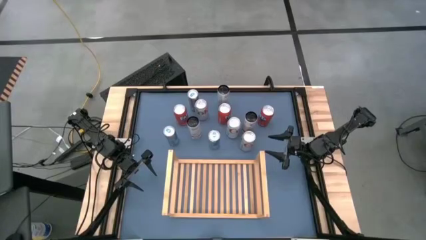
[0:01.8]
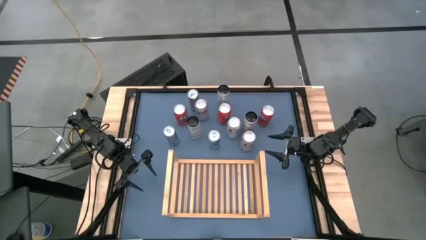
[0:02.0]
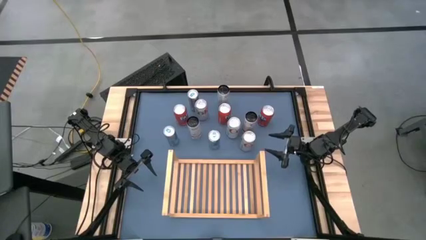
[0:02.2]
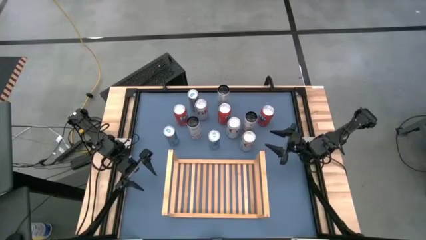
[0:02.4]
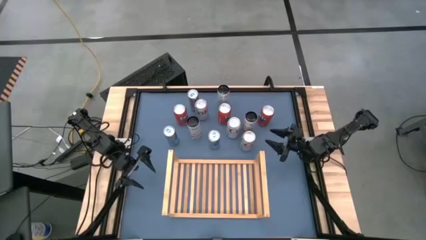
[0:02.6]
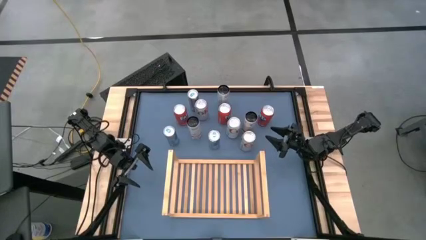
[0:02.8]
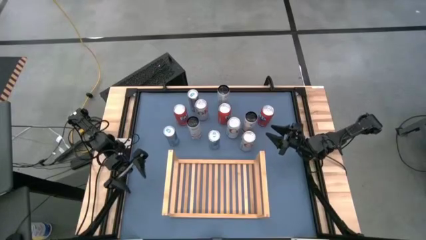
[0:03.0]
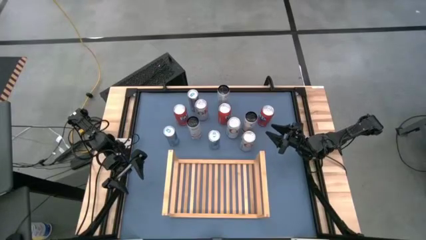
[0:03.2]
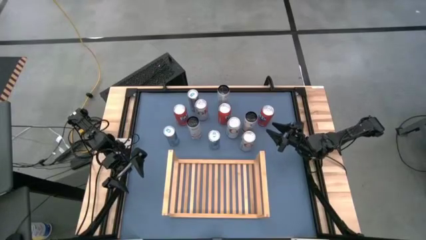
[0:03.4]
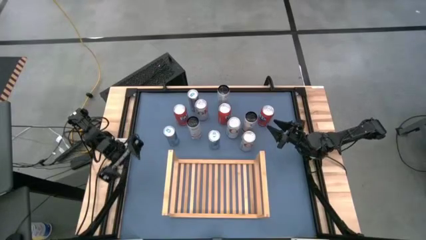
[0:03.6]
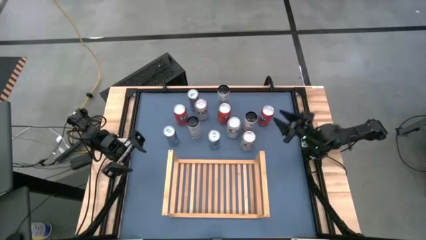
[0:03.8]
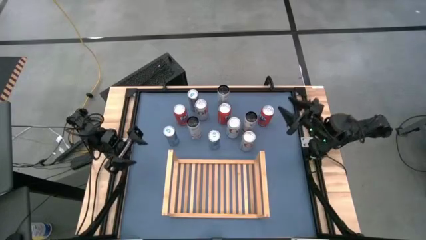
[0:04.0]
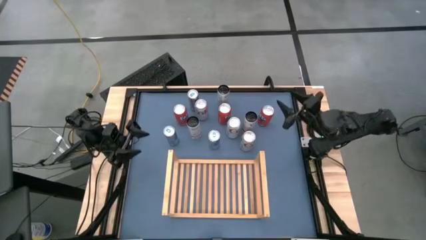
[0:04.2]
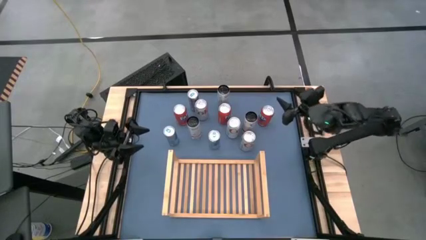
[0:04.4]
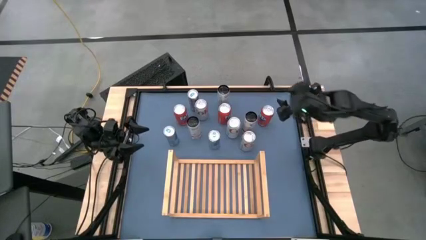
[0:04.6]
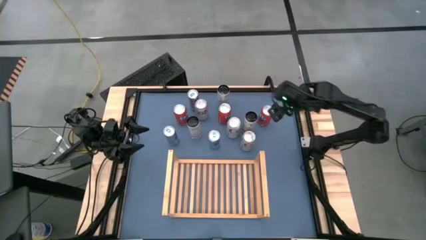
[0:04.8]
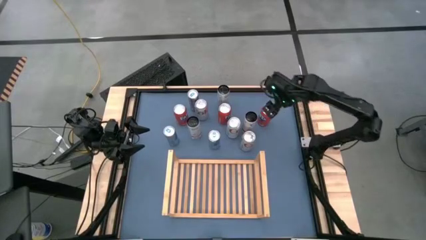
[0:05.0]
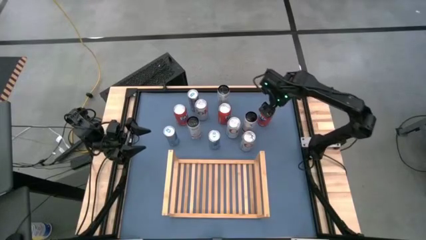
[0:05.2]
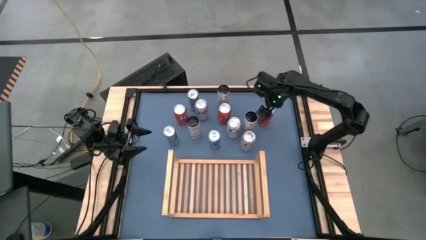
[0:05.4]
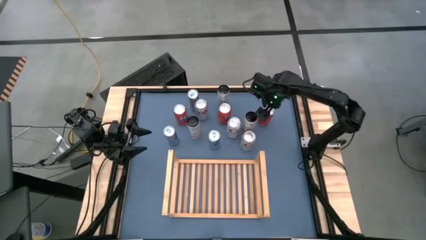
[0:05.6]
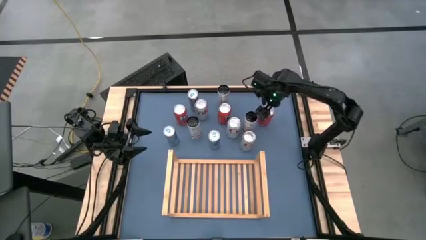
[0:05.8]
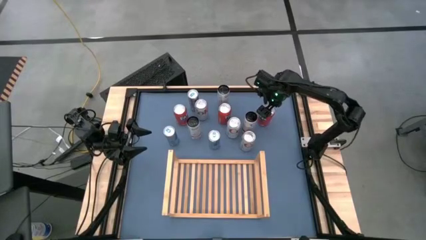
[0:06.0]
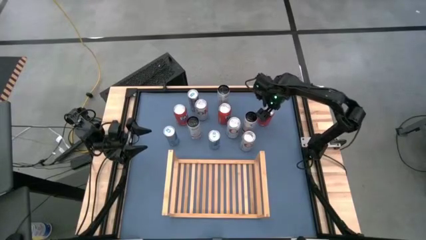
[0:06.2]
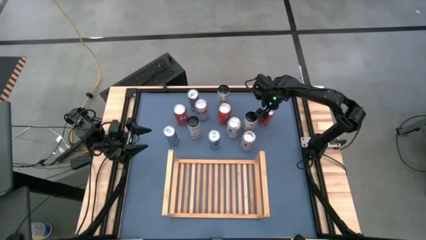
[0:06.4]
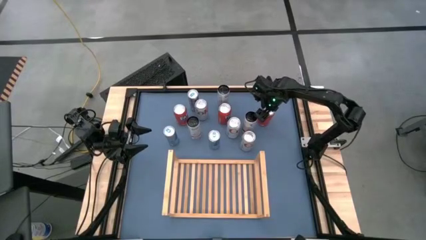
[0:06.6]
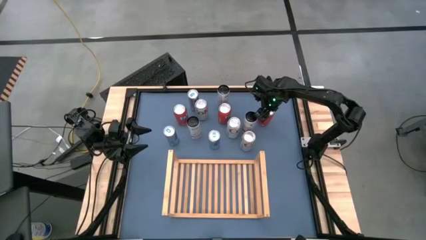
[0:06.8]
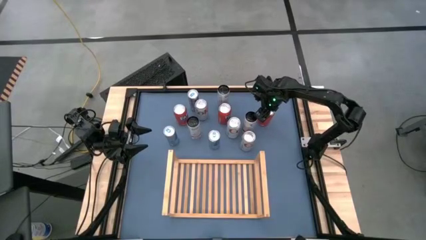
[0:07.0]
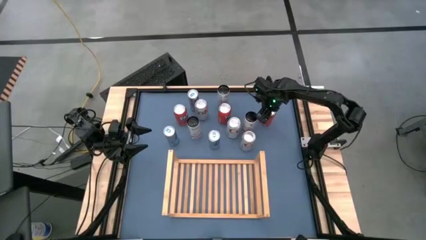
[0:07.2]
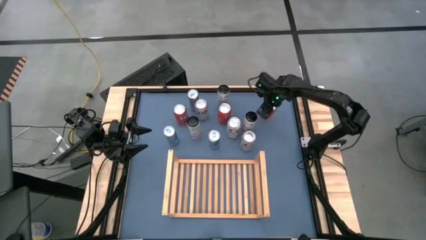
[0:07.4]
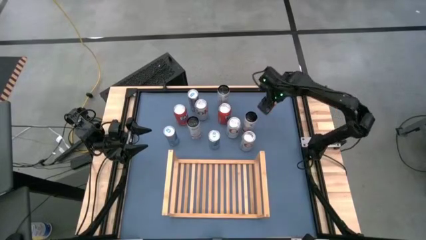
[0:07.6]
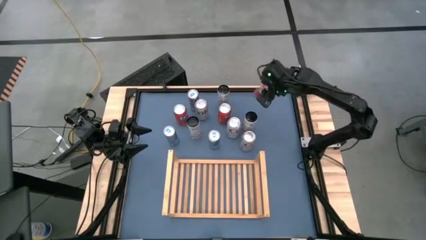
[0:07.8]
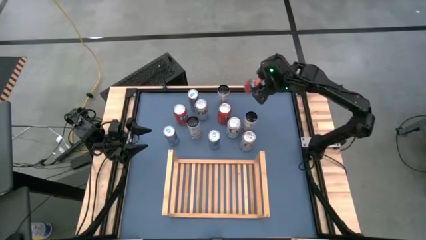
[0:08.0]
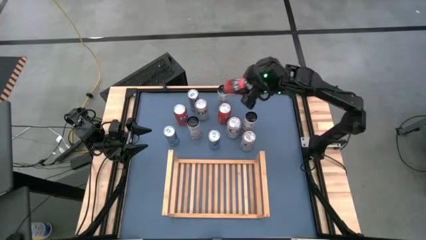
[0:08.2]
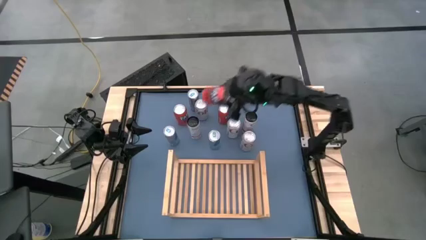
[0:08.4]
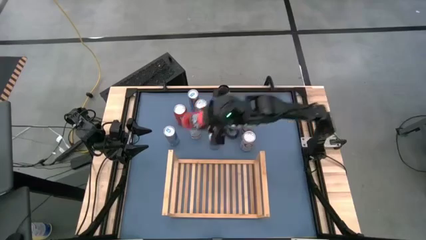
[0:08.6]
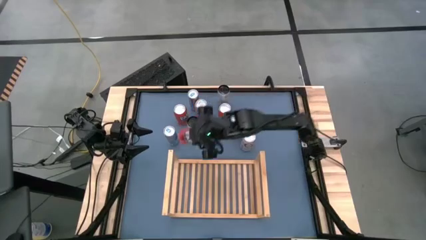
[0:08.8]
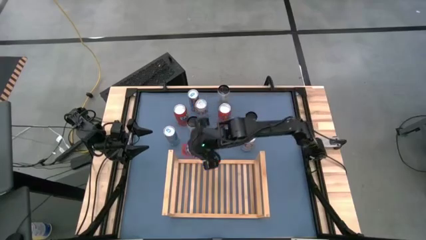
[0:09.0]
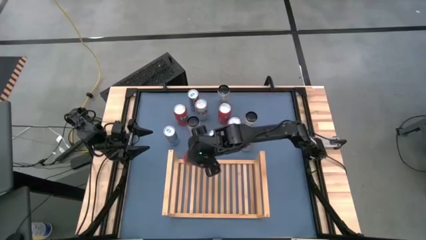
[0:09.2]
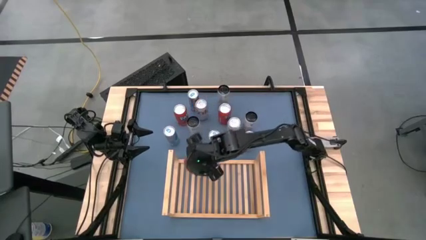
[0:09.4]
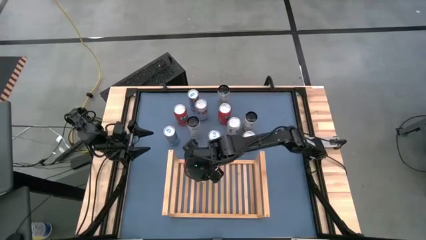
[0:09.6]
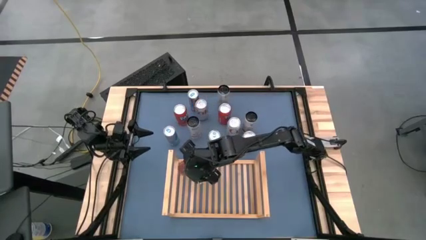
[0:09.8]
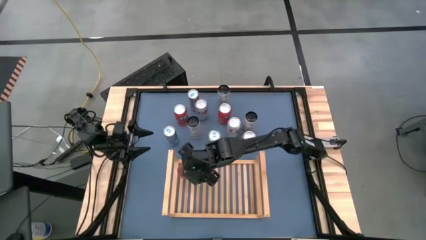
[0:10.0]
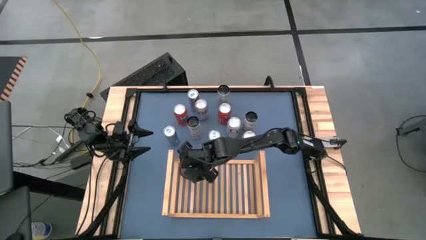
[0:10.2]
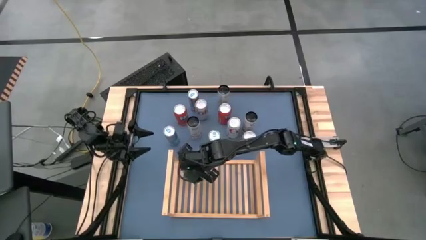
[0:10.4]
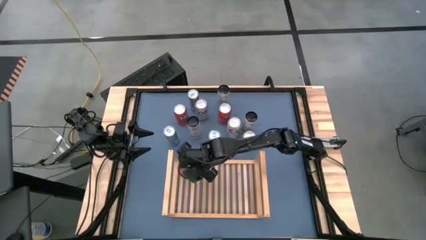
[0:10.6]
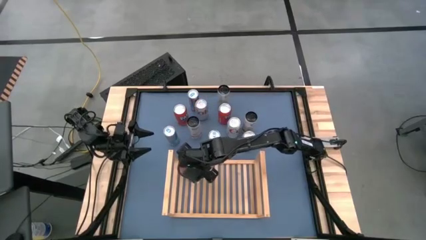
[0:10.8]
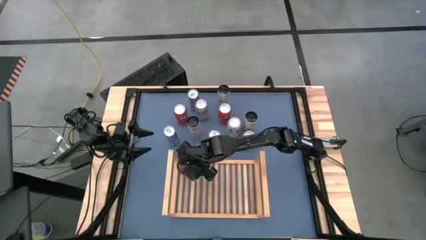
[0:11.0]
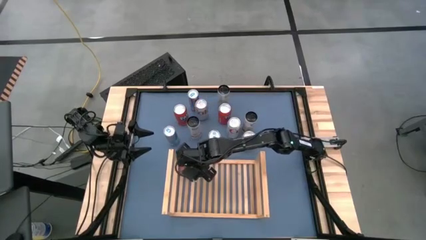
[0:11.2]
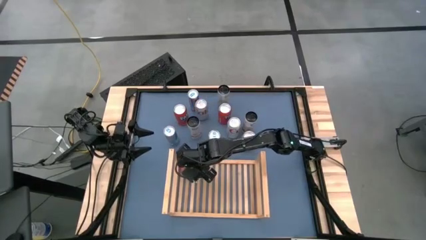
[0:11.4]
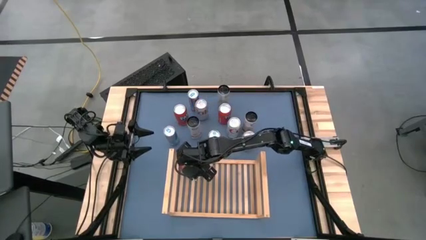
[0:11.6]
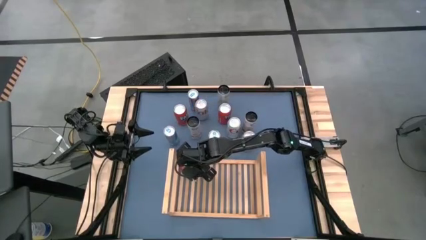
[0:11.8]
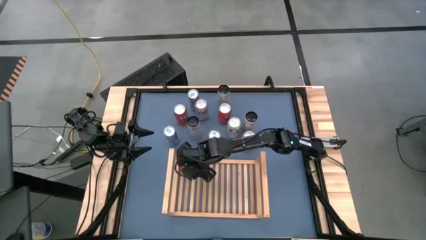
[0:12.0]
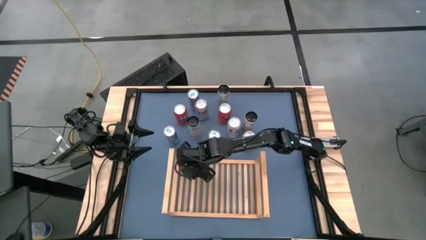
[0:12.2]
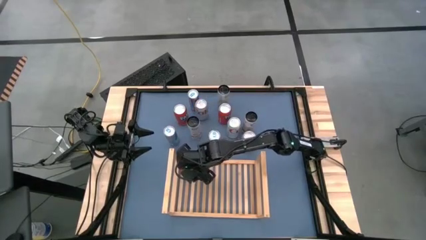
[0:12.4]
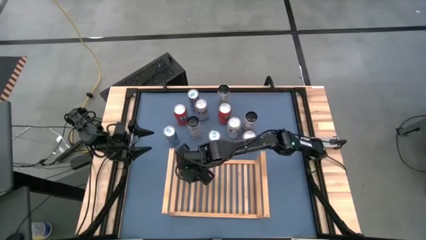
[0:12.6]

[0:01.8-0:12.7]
Task: Place canned beverage on shelf
Put the right red soda can on the shelf
